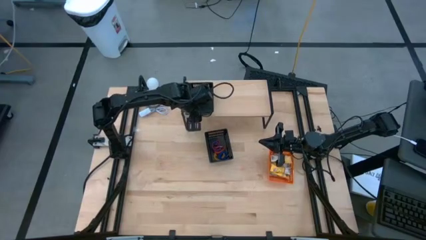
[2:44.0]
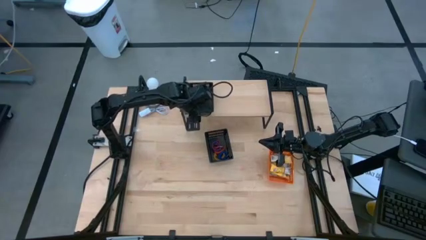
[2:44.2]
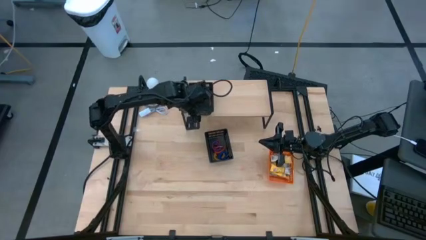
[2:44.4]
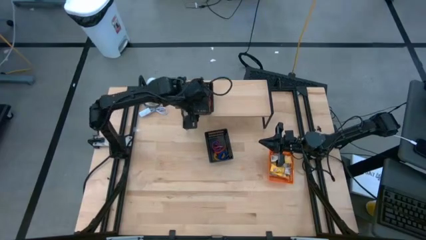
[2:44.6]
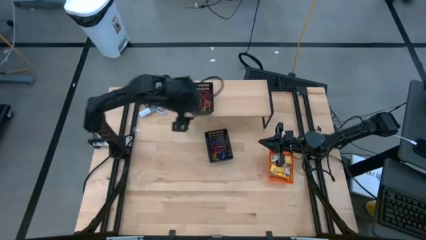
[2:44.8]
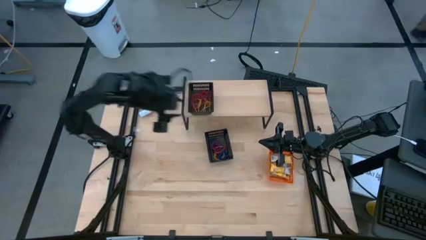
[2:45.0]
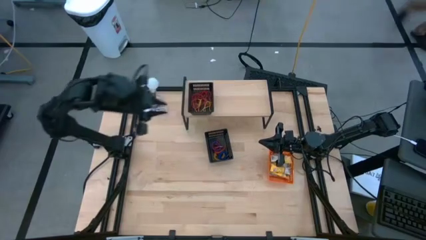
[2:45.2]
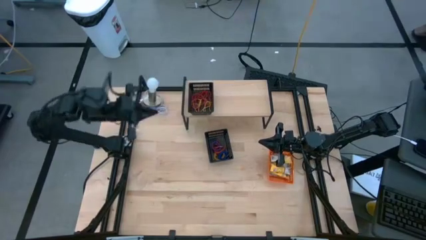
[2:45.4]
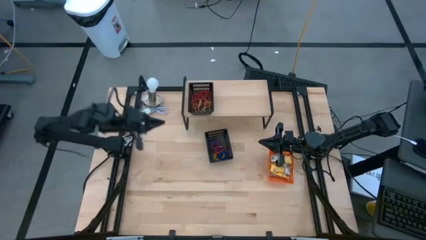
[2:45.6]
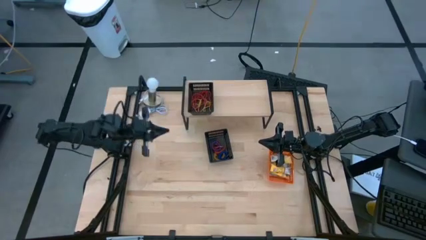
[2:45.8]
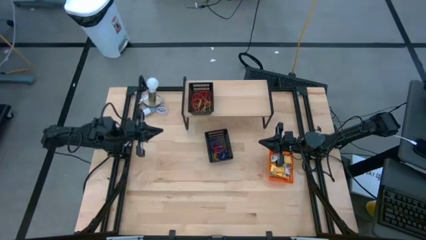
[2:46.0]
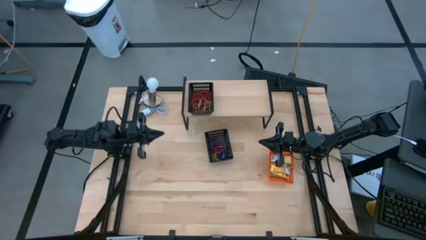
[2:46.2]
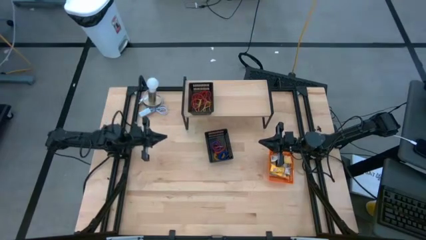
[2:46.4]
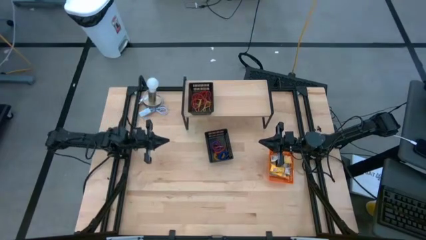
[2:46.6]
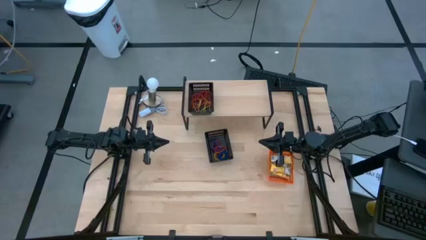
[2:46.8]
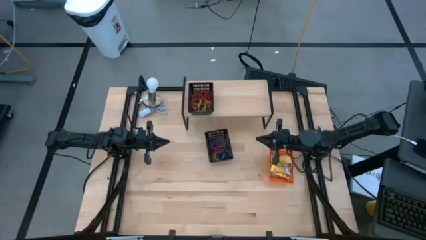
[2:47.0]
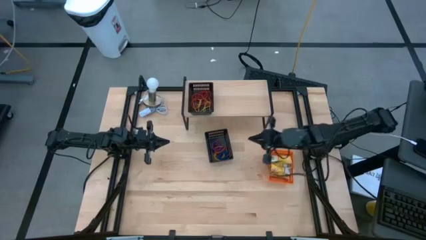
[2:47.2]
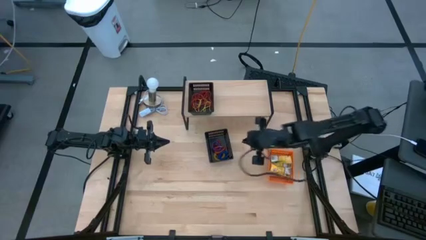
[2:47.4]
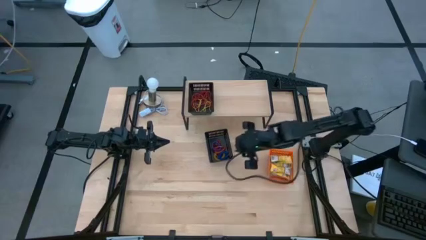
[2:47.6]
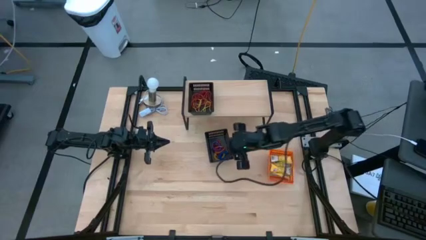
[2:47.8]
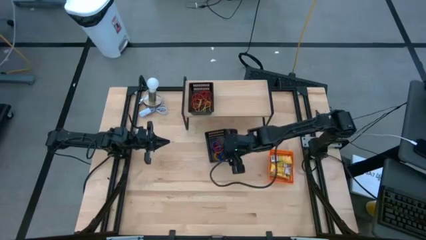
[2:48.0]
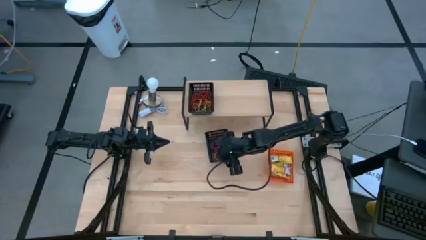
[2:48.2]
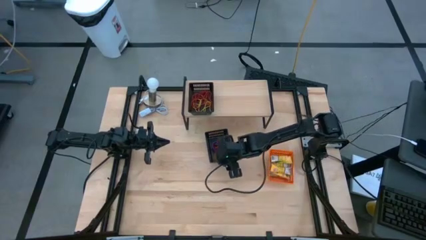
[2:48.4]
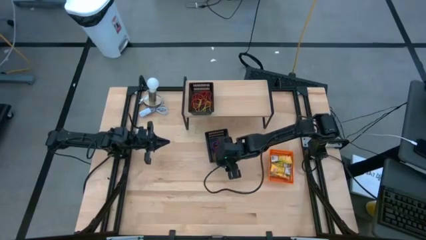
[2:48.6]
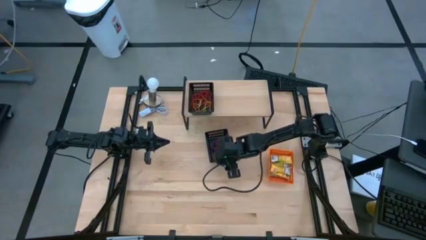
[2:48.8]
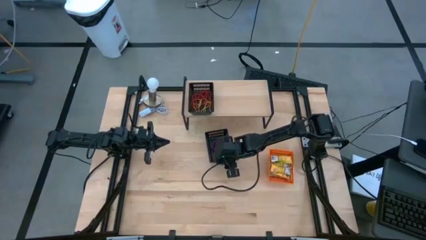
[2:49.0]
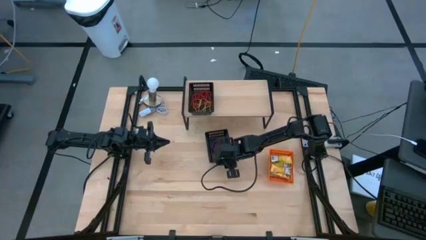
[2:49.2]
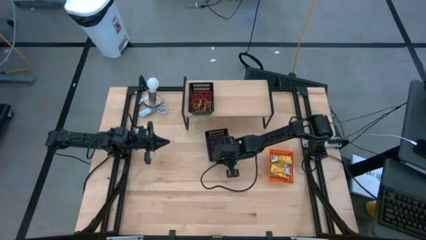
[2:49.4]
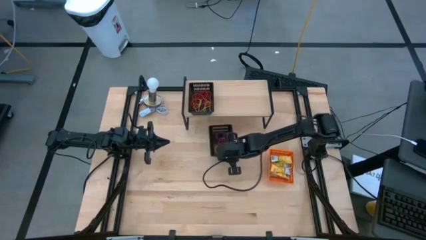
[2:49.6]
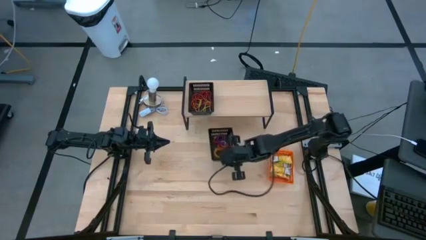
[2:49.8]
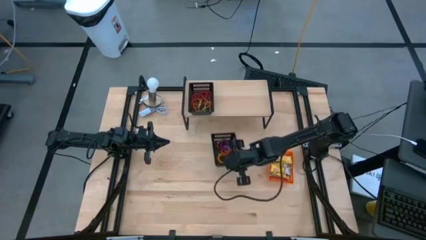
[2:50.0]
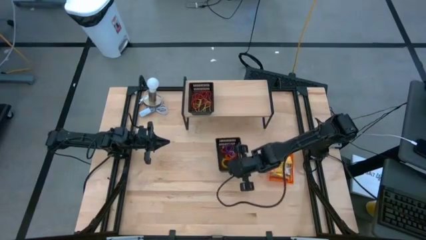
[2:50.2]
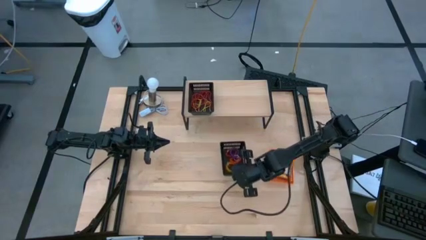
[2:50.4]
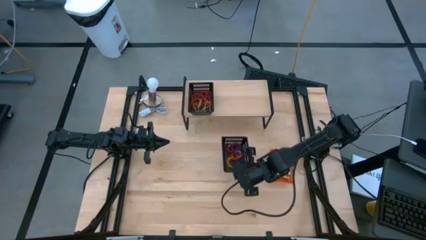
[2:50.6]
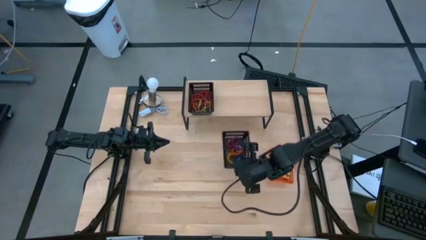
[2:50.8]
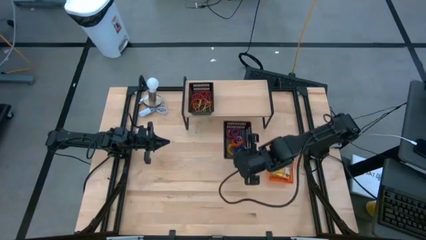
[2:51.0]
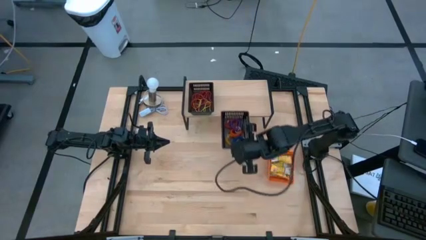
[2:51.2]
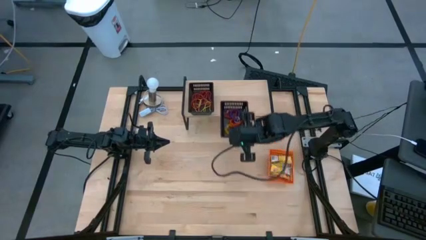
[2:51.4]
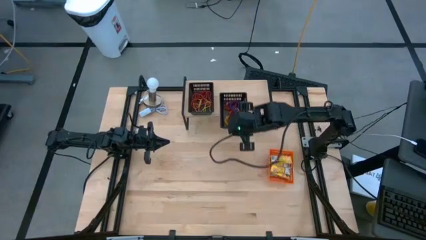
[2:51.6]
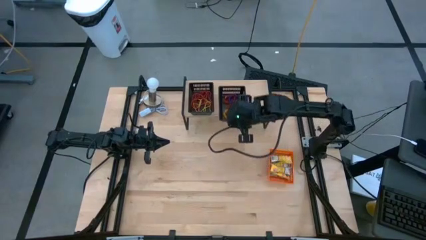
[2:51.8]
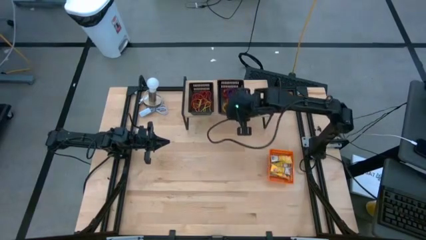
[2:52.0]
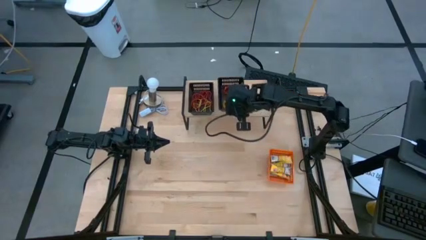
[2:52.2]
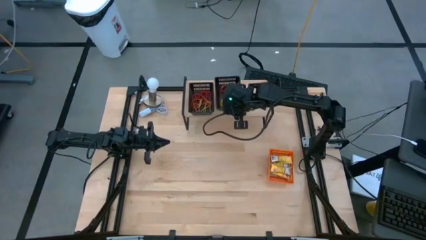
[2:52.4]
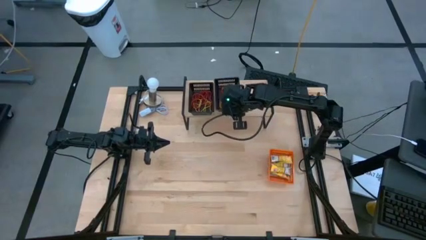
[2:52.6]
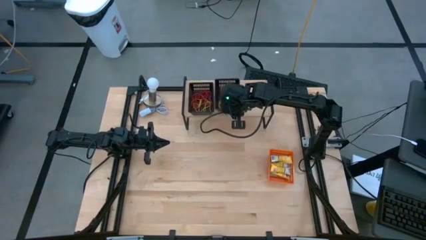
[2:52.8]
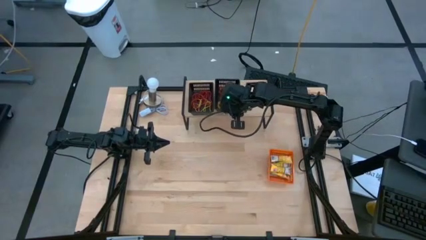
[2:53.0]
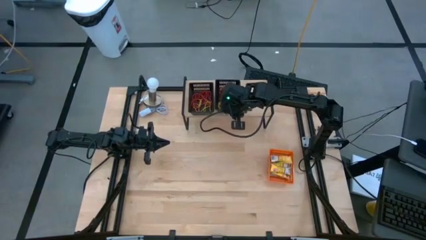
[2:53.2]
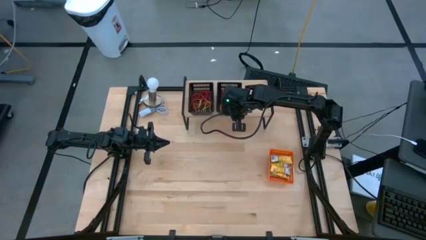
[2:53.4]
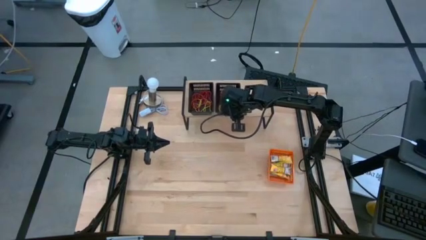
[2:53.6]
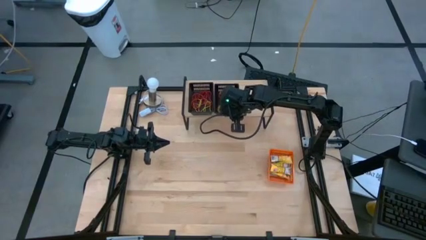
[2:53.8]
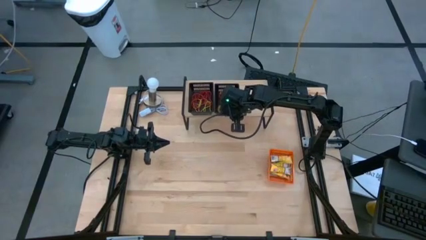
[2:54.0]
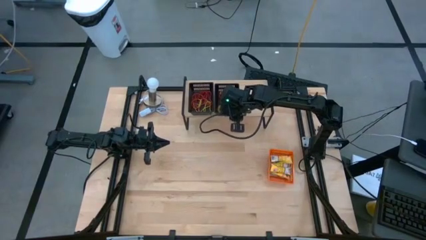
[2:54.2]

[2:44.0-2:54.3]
Task: Pick & Place Office Desk Supplies
Put the black bin on the shelf

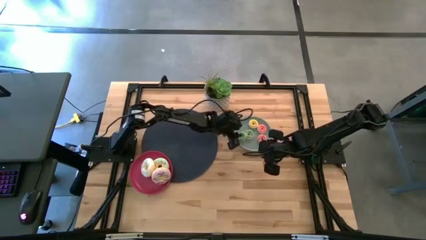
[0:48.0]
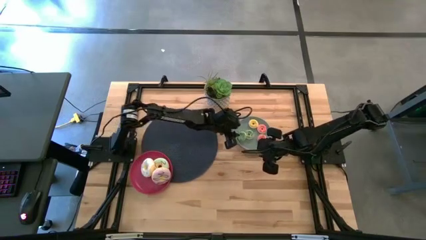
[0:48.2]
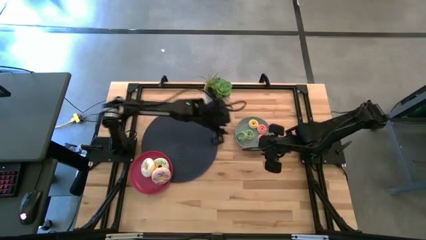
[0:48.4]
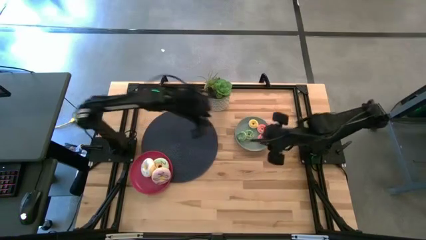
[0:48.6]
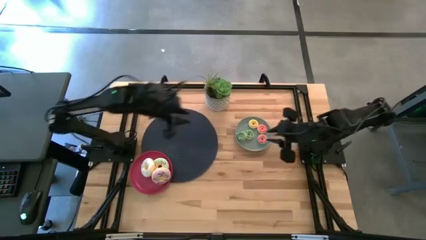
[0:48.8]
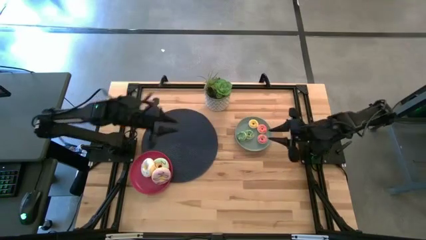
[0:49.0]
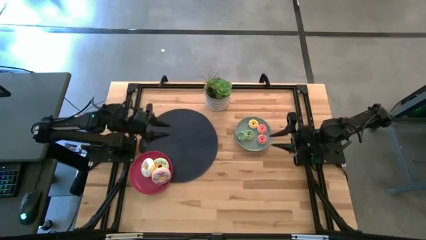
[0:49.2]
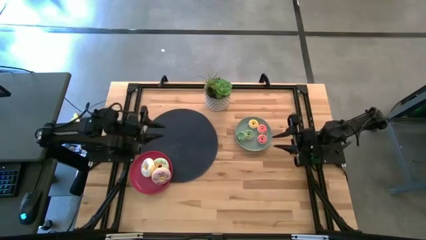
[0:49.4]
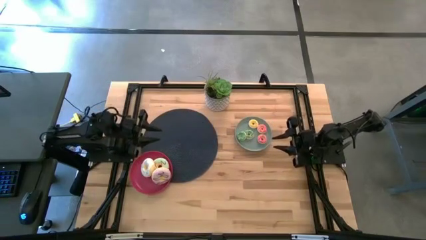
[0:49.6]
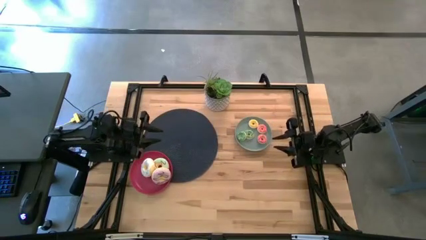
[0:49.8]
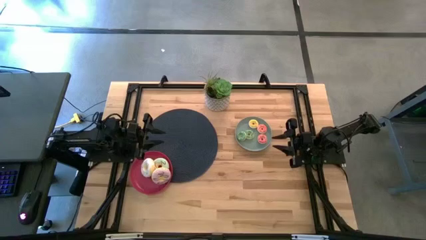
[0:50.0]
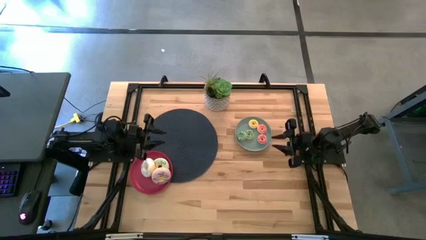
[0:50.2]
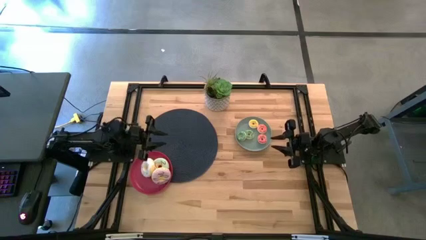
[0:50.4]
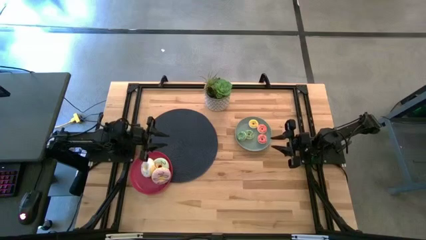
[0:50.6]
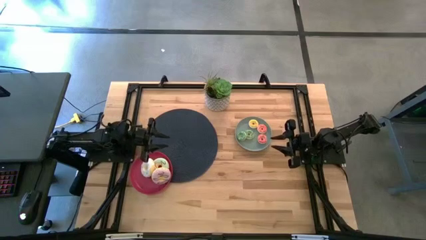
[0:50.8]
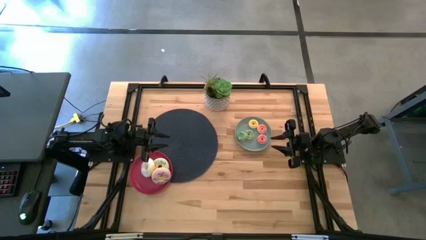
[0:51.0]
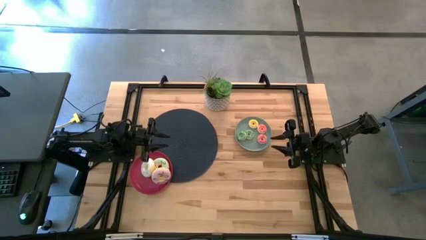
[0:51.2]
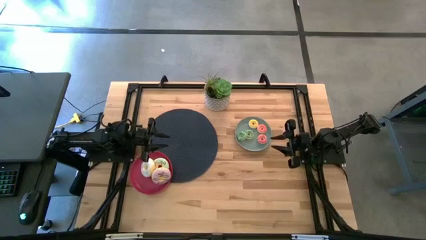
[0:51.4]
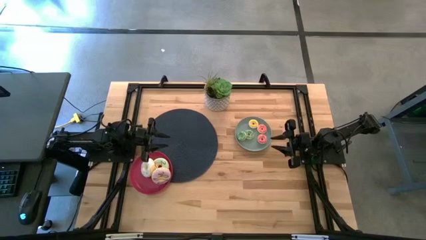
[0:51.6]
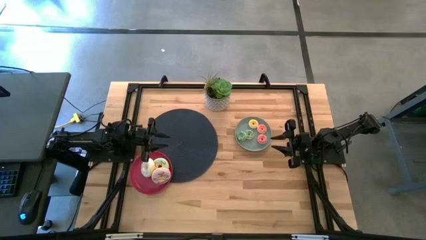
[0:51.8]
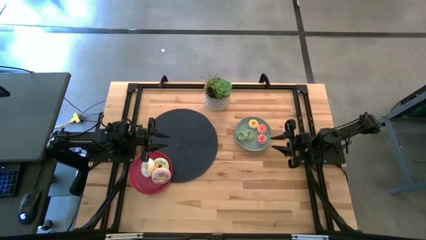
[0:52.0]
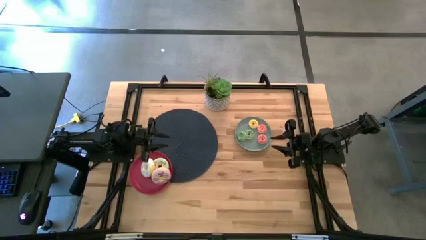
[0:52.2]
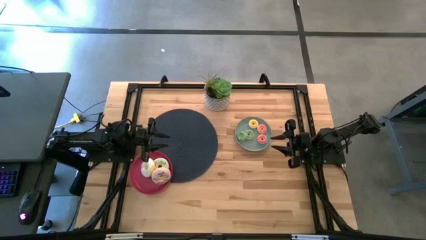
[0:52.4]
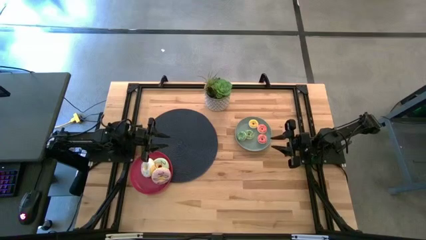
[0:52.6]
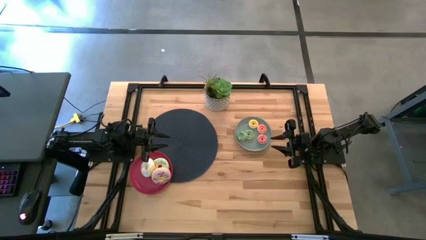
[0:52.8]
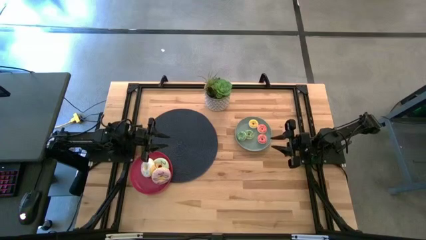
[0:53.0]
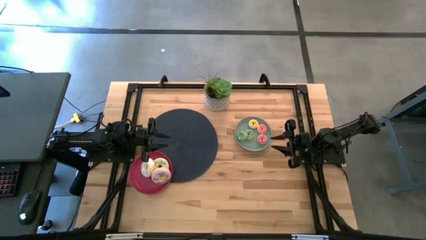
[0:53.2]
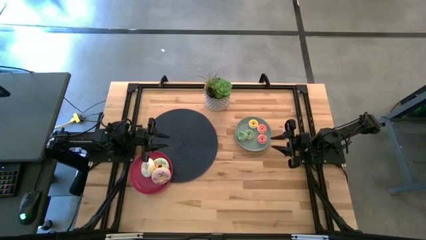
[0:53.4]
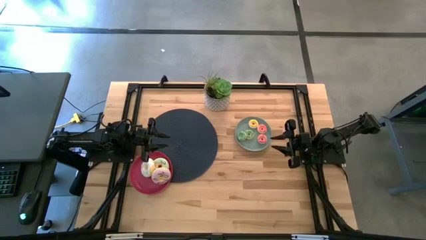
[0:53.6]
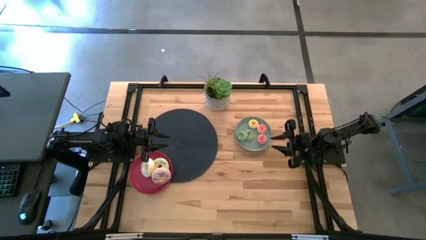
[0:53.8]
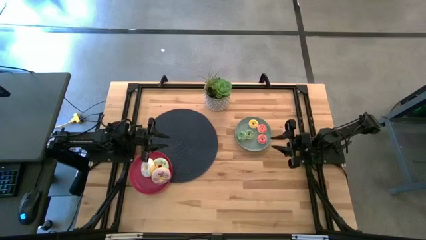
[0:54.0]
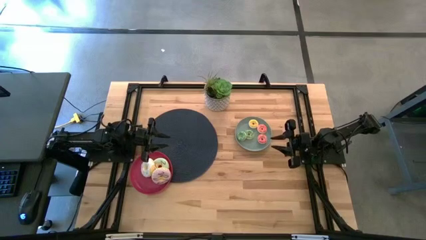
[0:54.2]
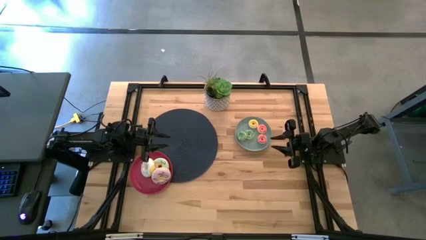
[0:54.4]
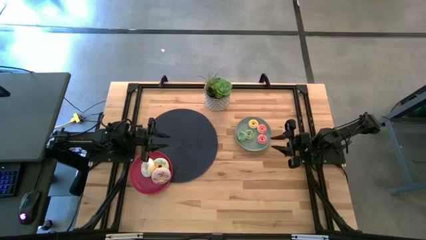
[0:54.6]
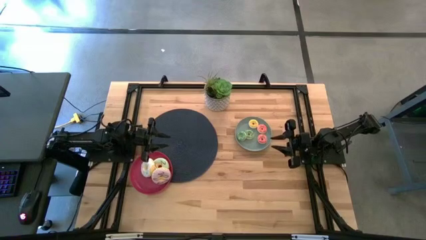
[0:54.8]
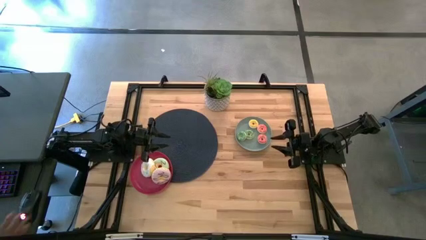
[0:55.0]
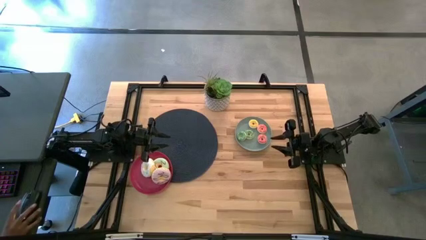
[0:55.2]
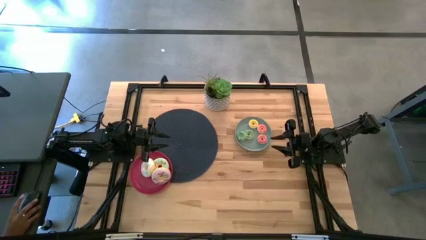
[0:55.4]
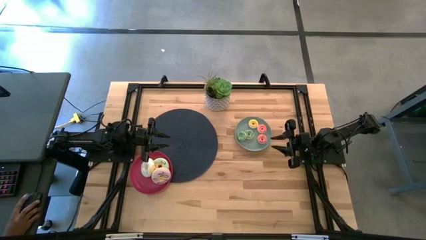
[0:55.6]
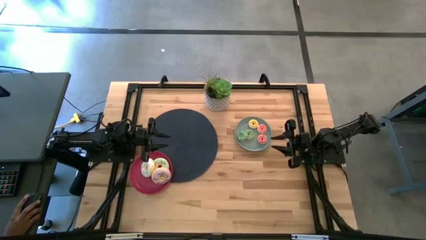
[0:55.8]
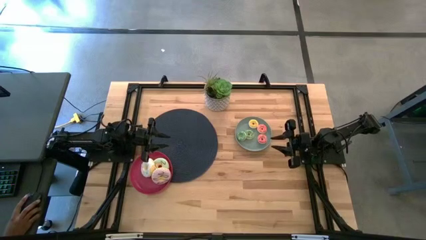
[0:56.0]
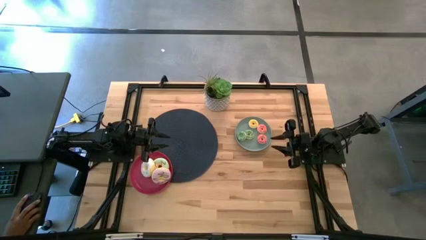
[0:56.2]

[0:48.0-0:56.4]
Task: Pick & Place donuts
Return to Home Position
